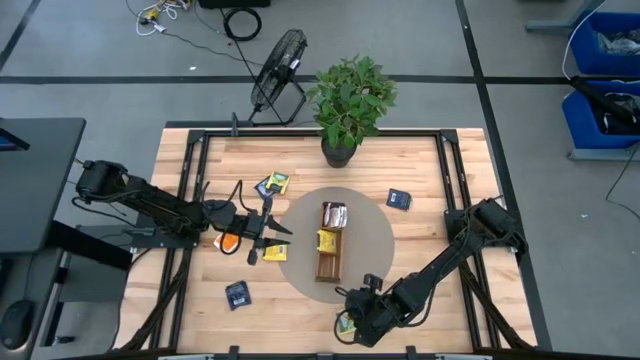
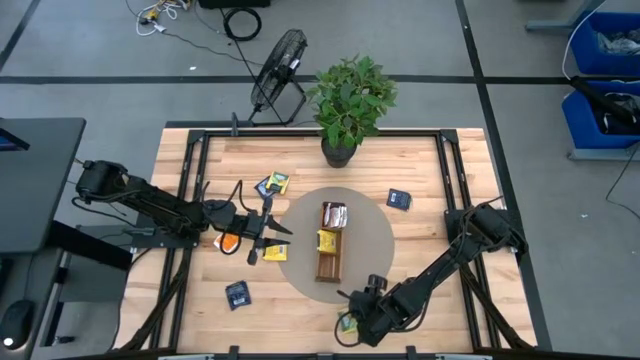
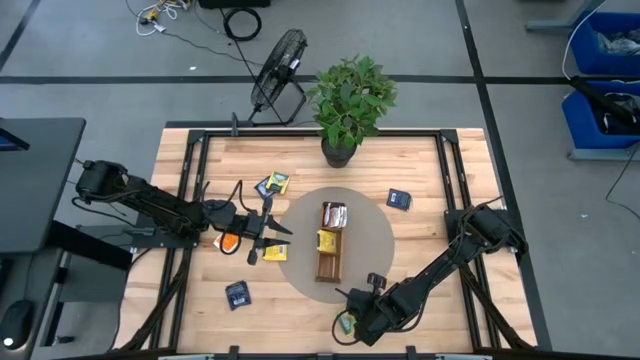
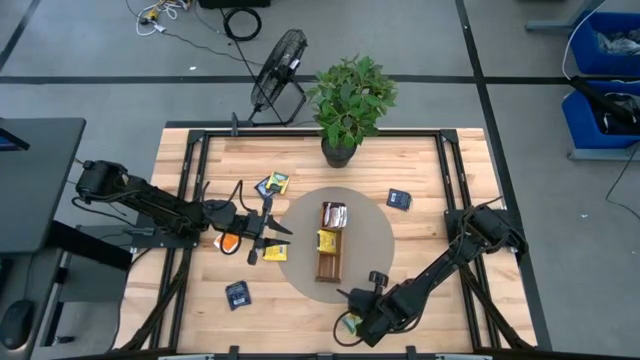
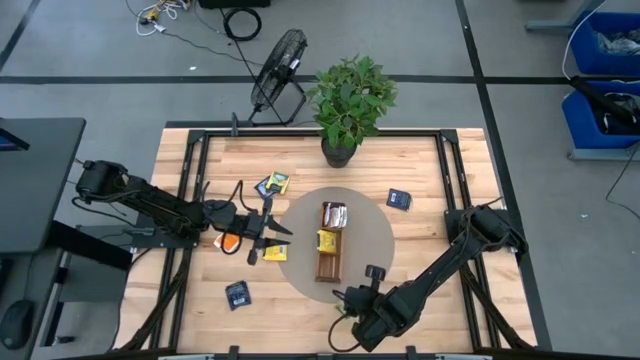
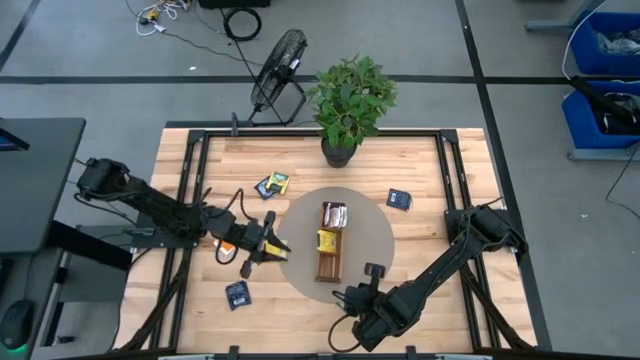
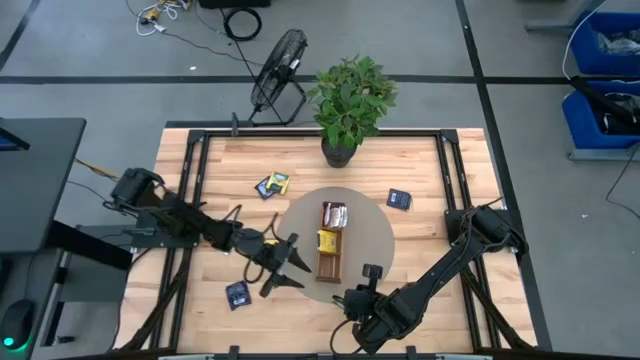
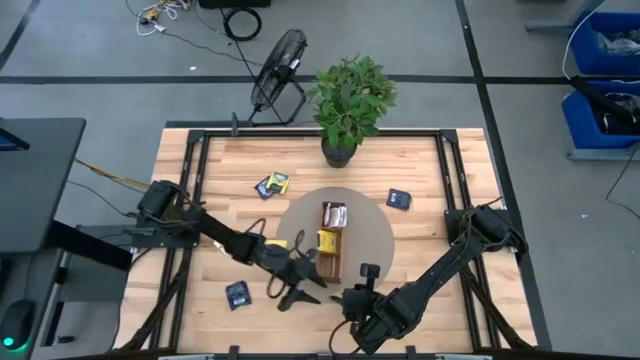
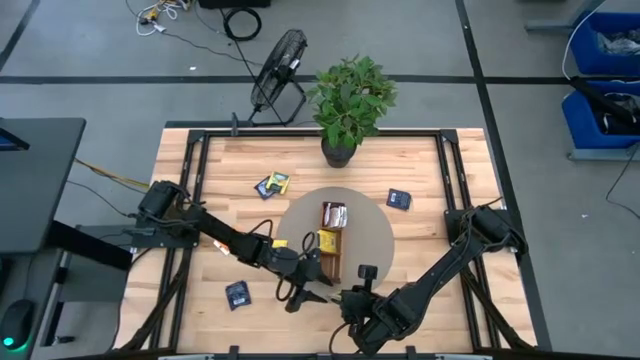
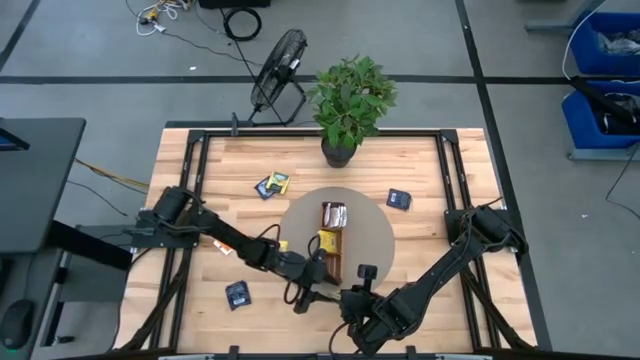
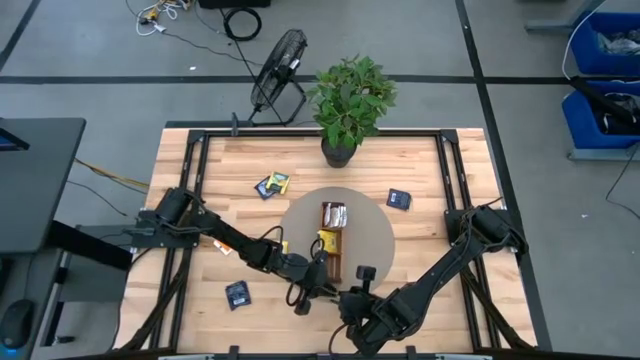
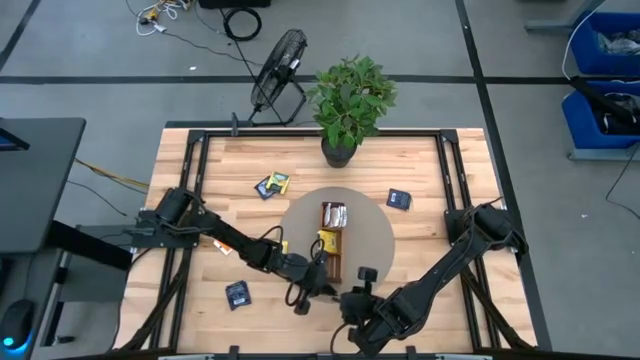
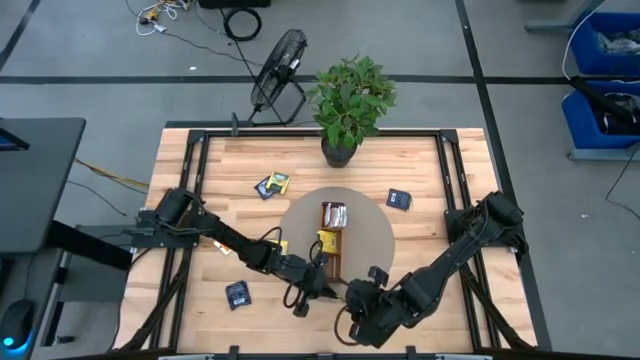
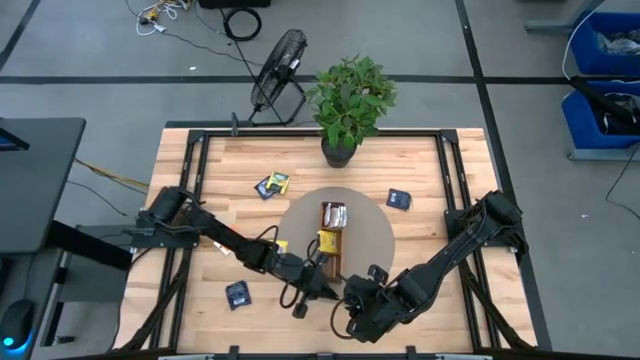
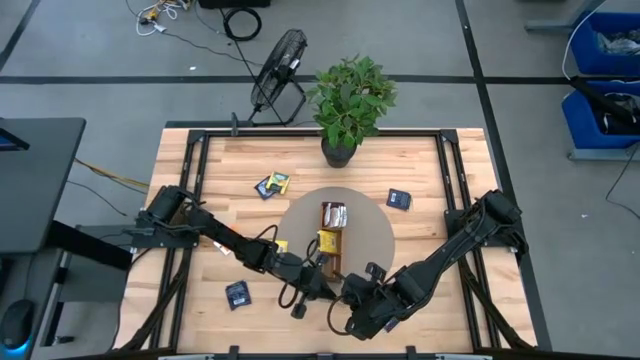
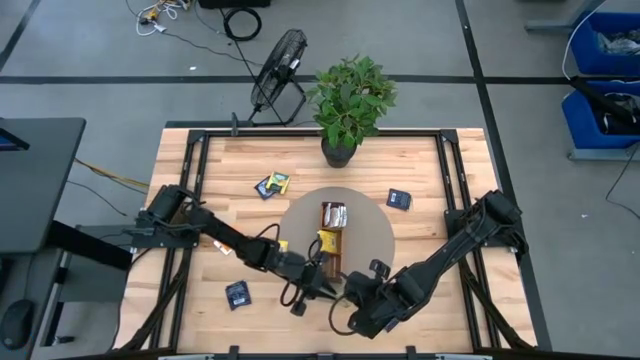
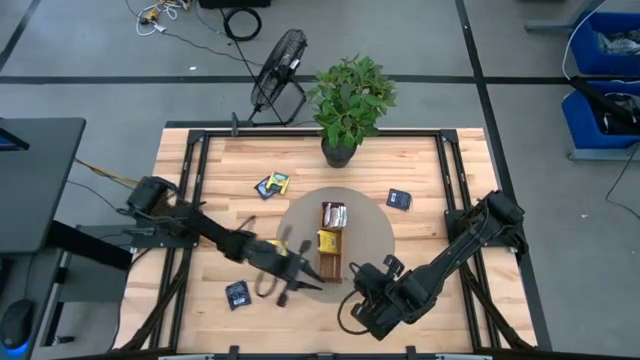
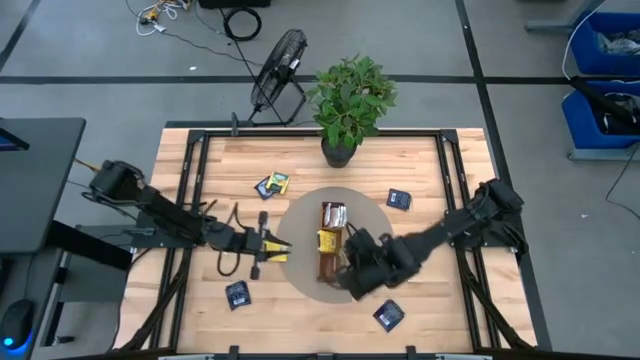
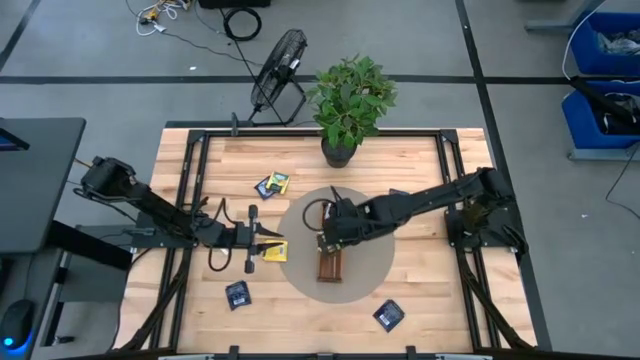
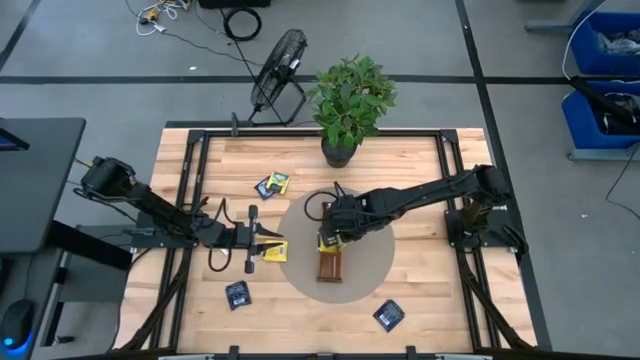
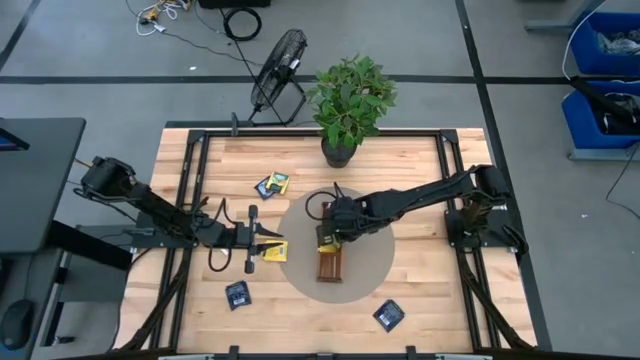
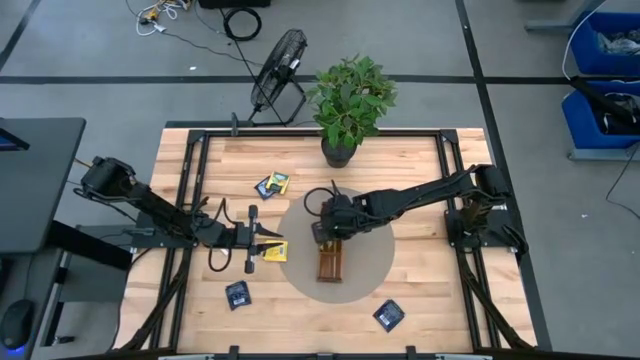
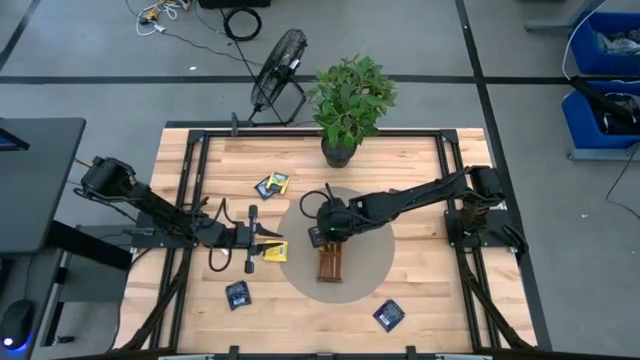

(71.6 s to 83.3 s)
Task: Pick & Place Tea
Put the yellow tea bag into the middle compartment of the middle section wooden organizer

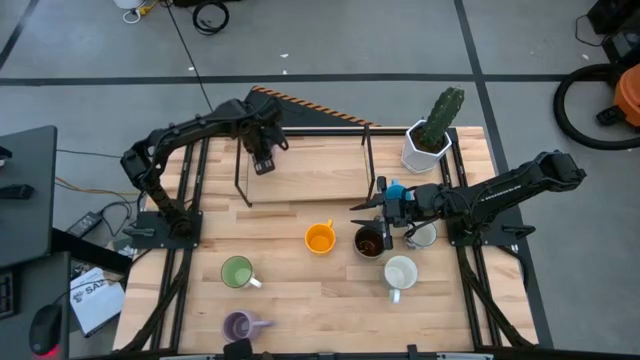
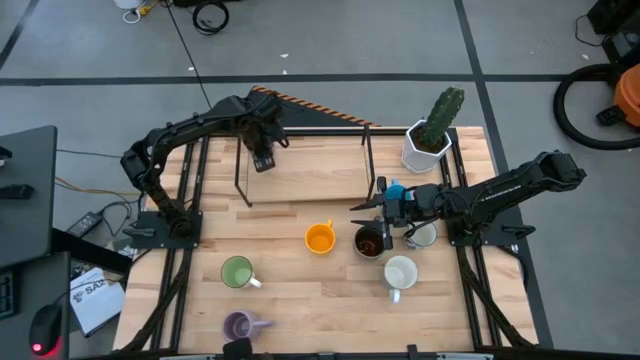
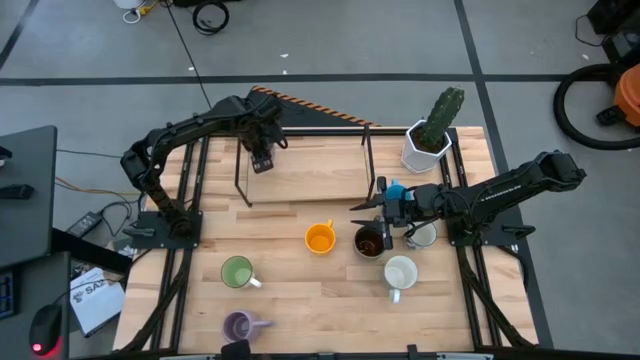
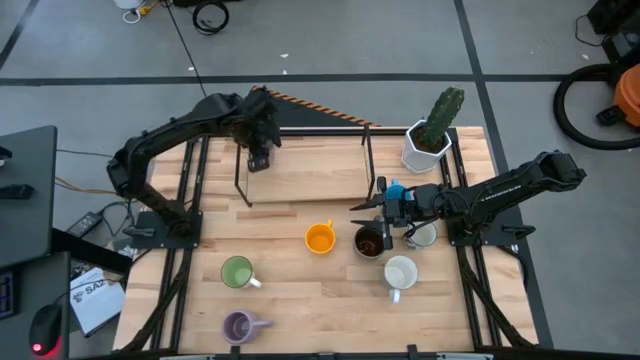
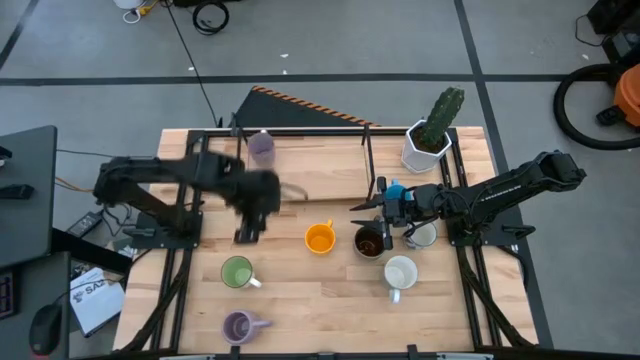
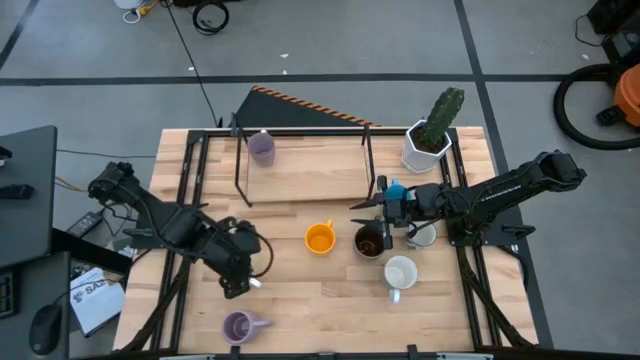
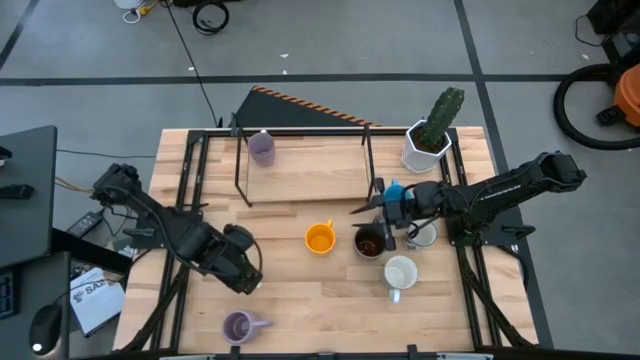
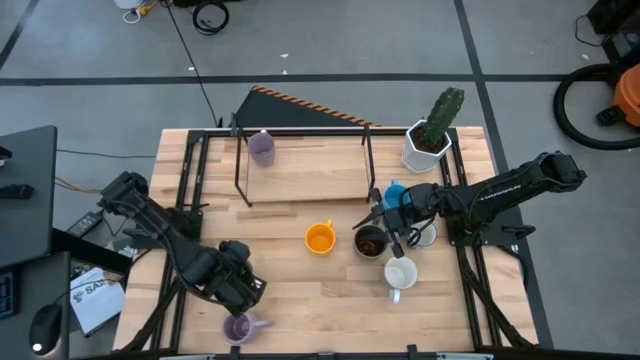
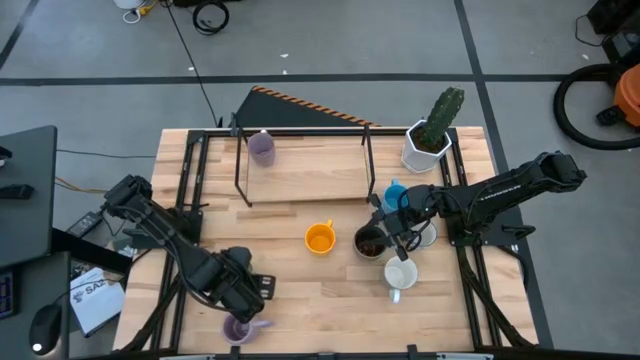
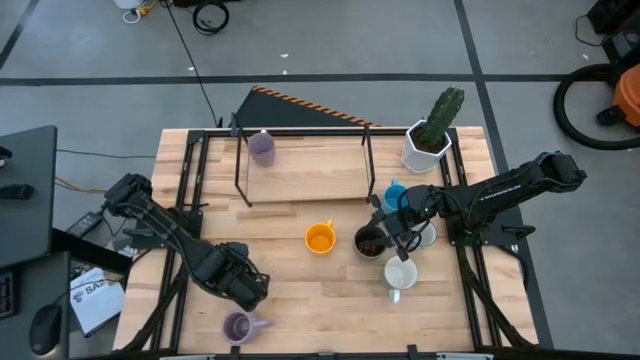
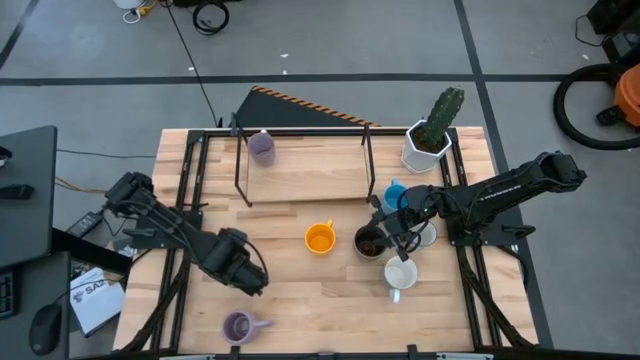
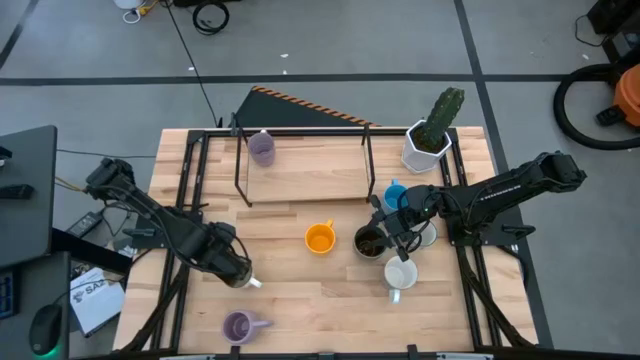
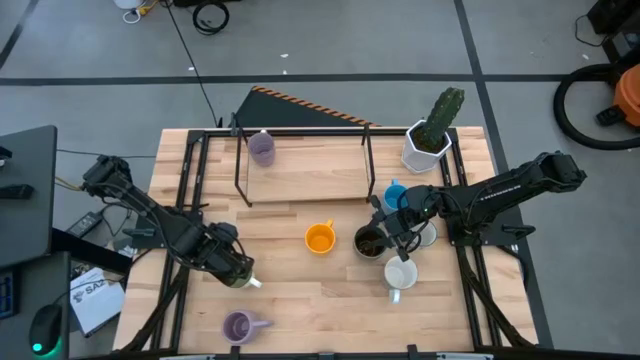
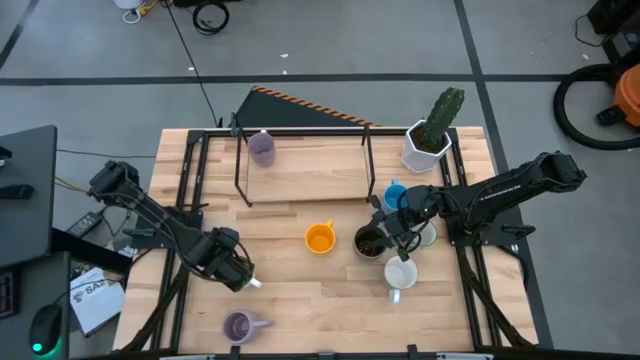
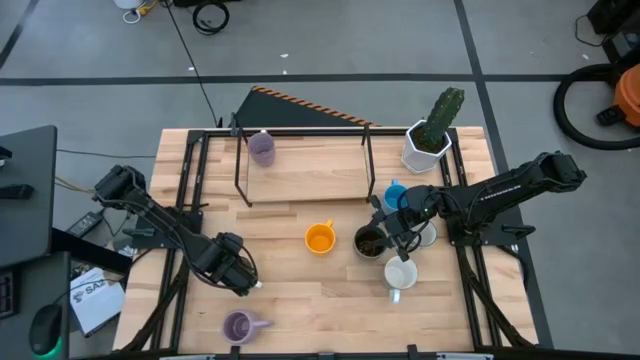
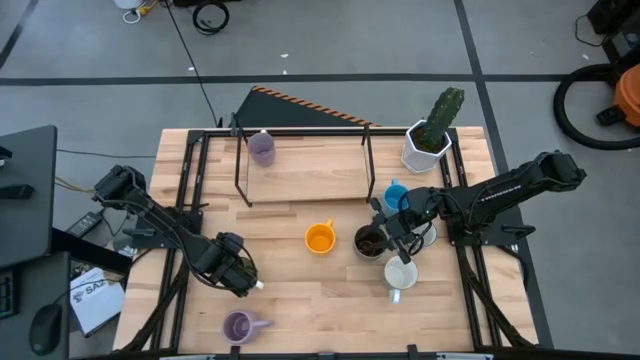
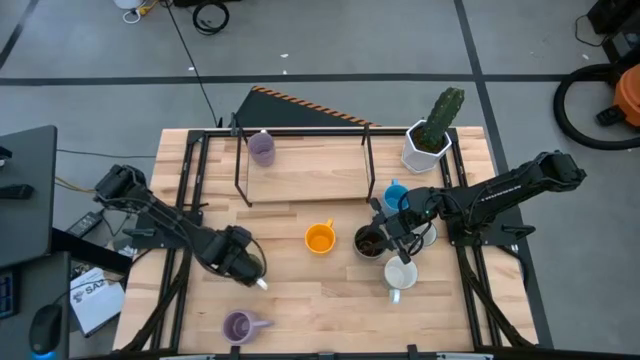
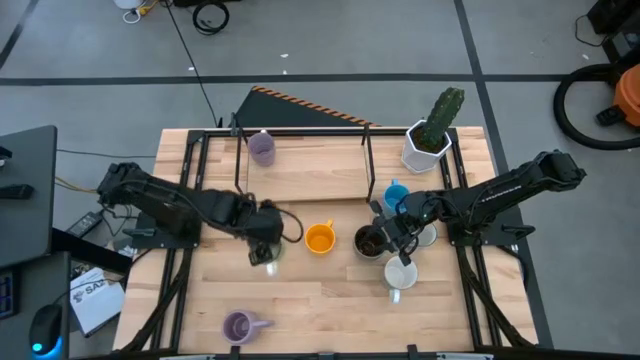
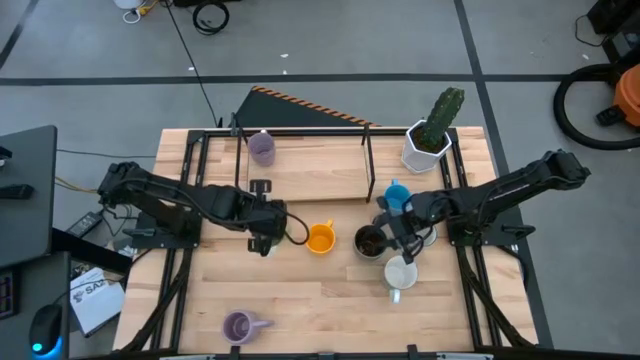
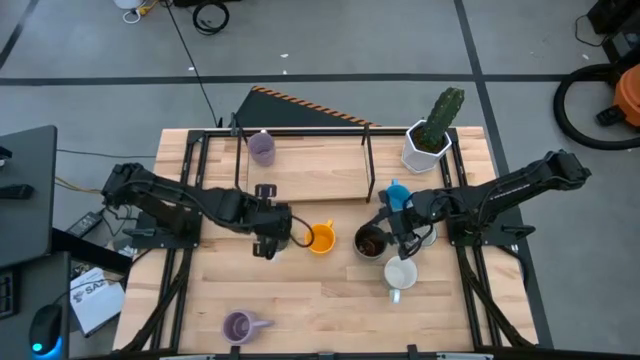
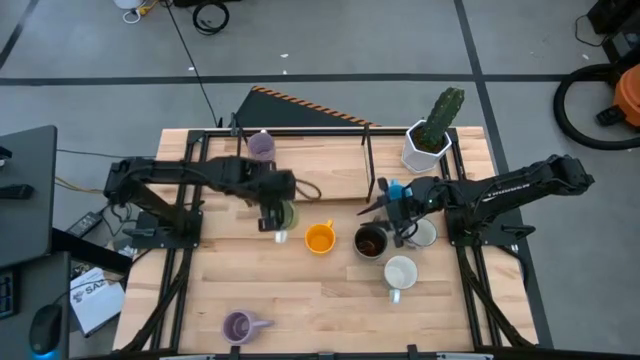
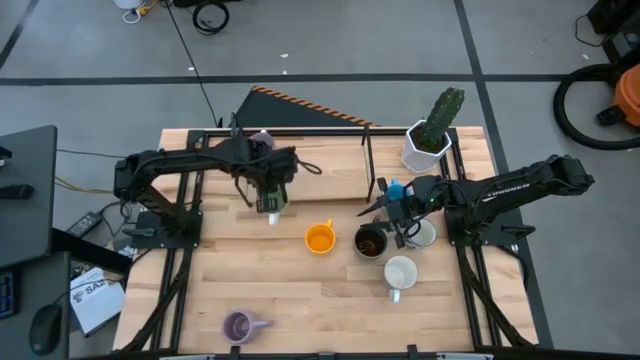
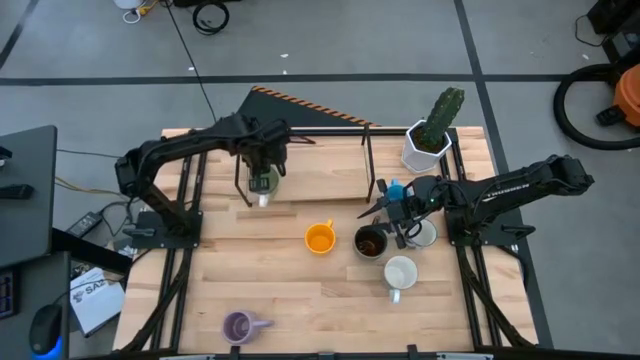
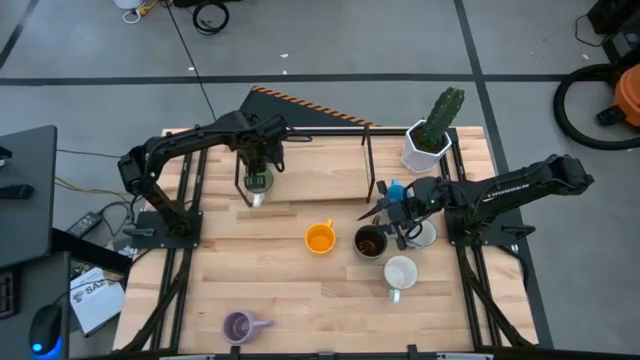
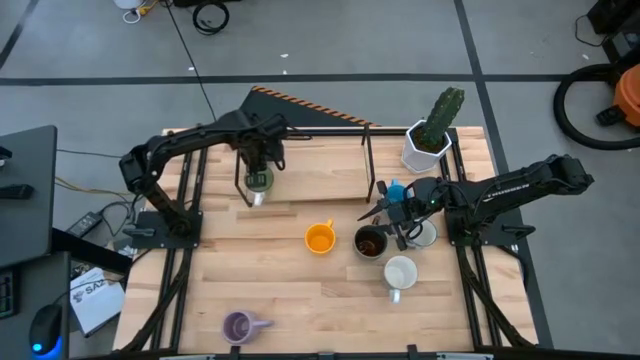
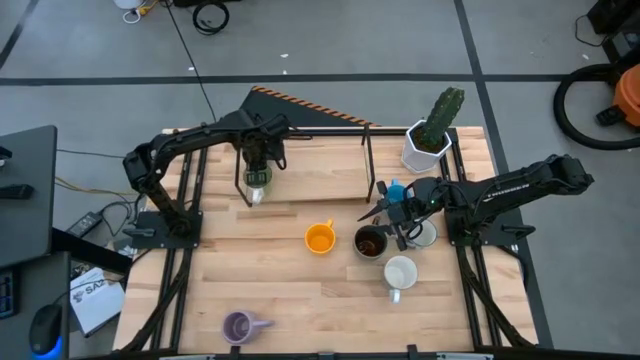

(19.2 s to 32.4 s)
Task: Place coffee mugs
Put the green mug on the shelf
